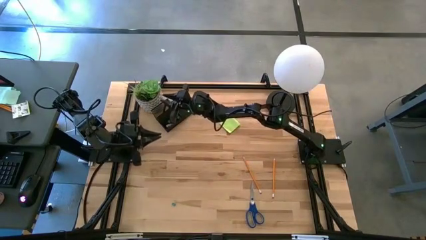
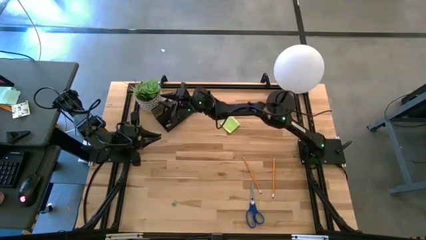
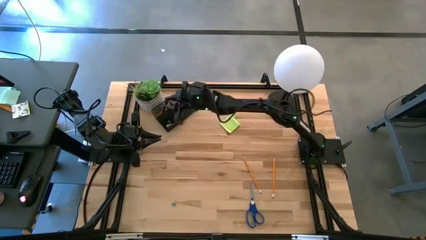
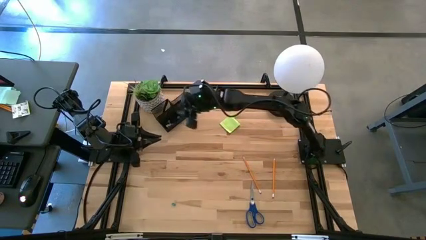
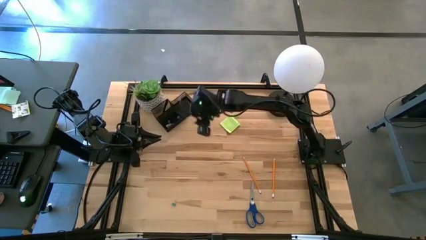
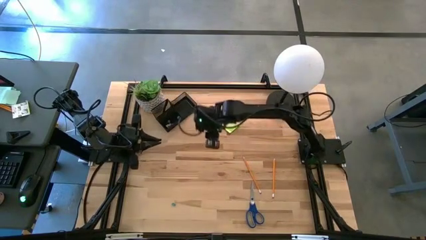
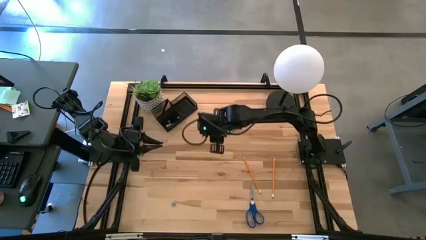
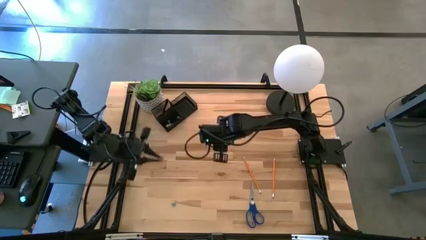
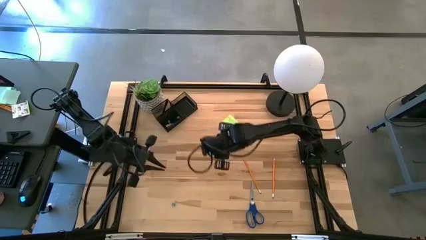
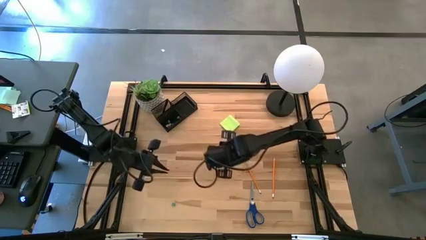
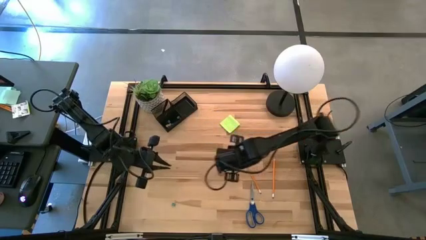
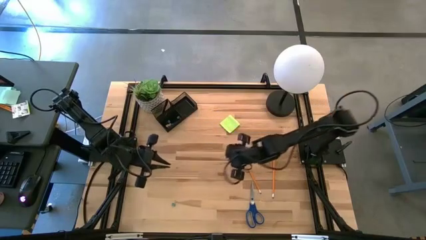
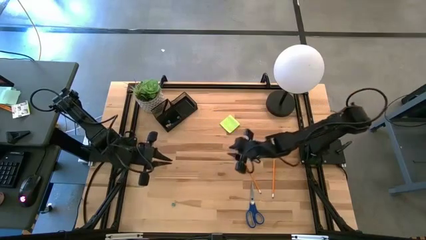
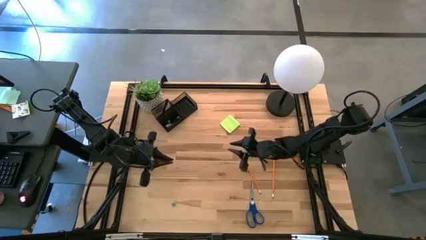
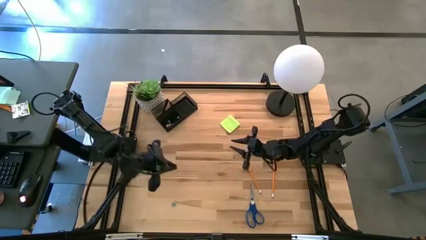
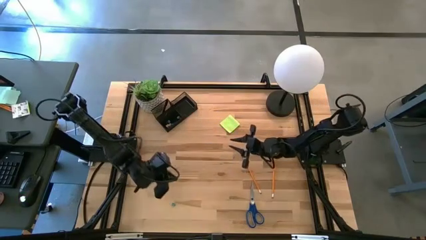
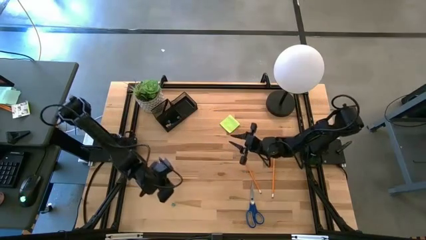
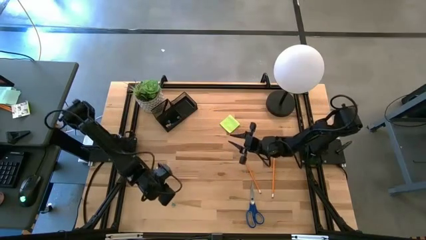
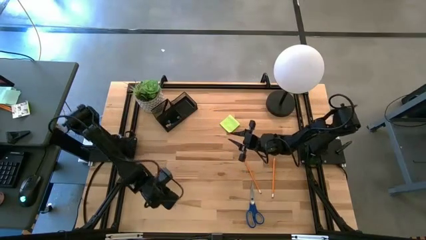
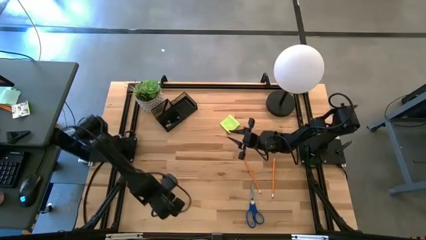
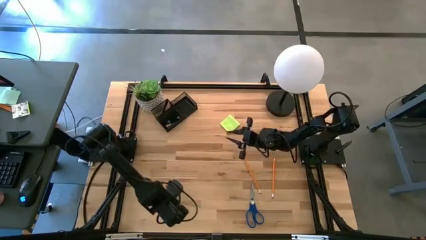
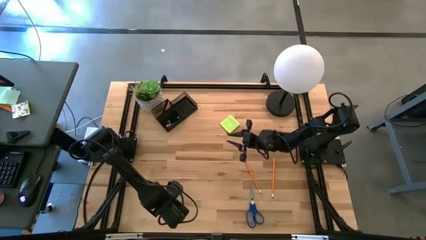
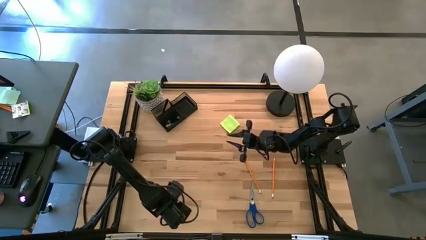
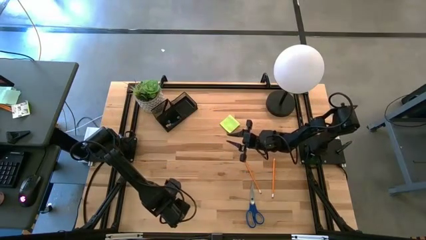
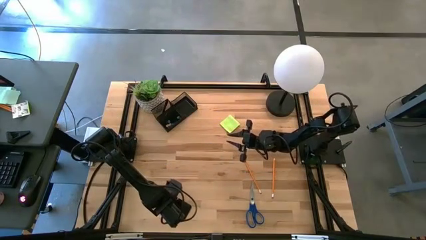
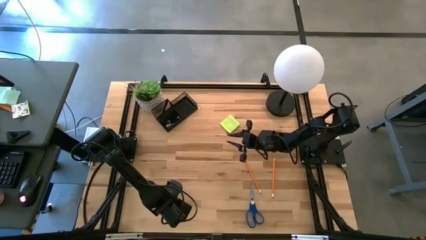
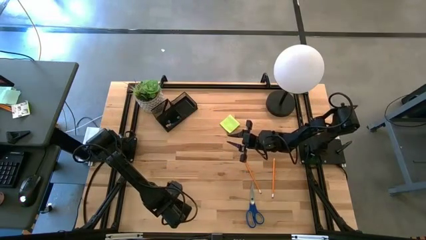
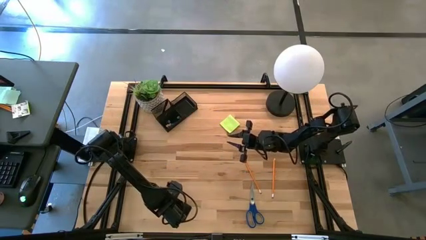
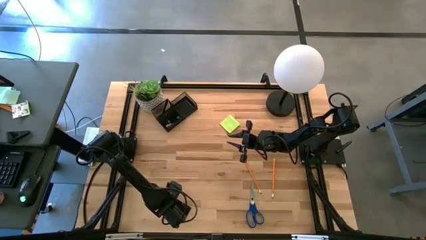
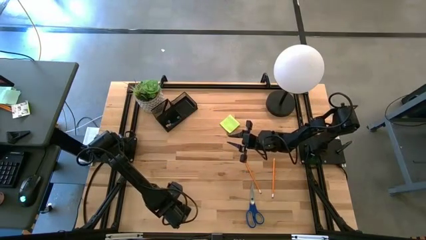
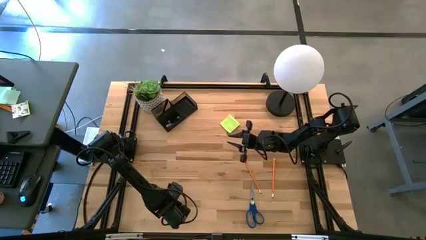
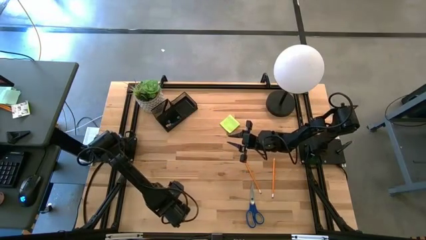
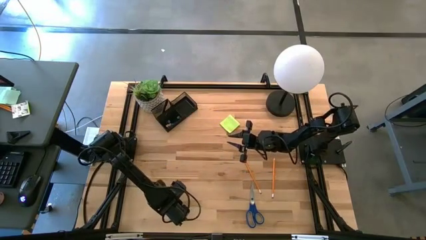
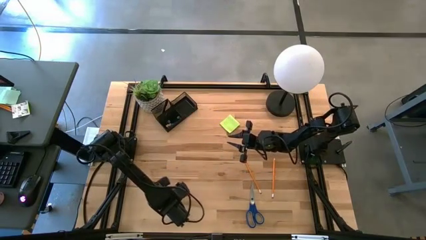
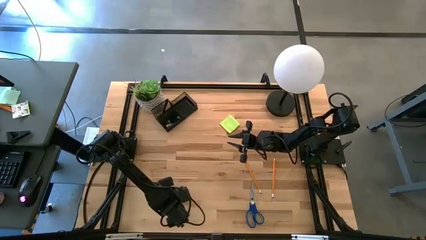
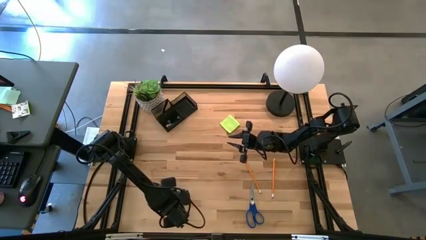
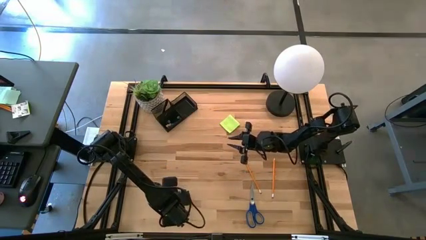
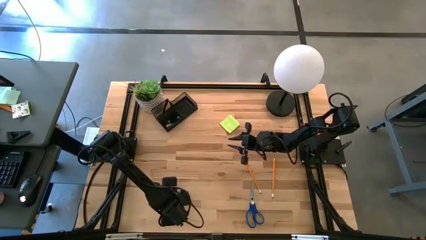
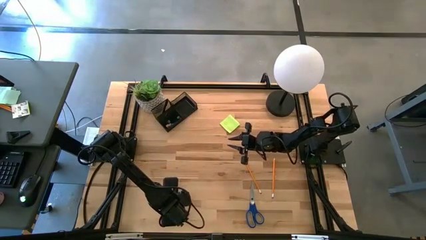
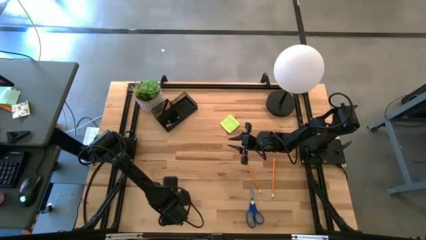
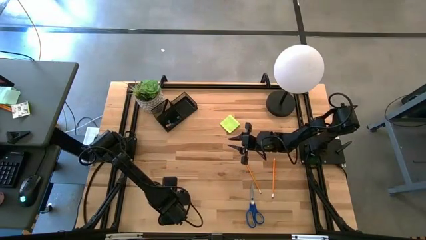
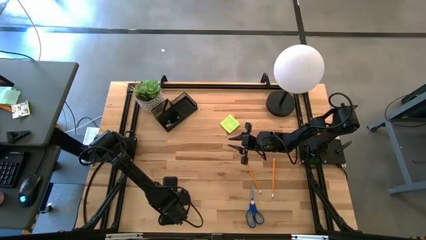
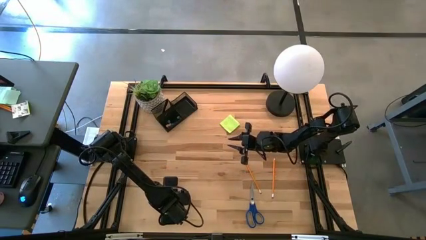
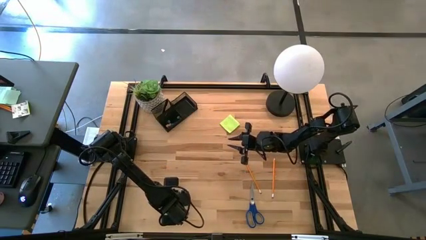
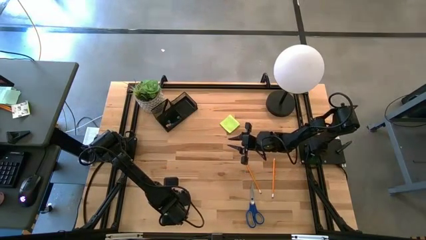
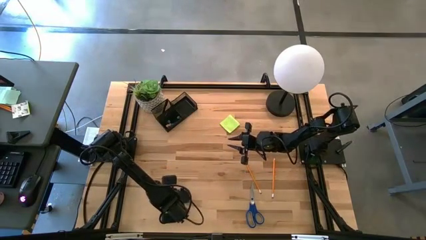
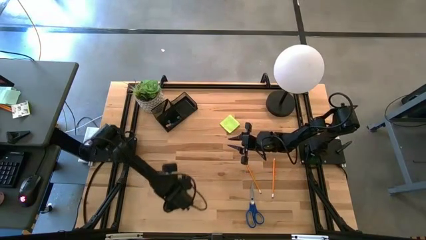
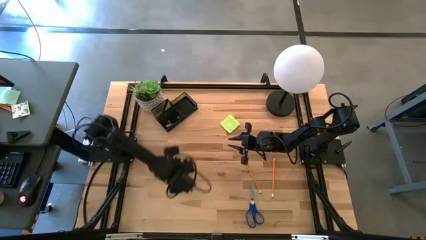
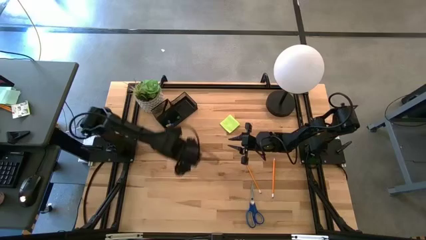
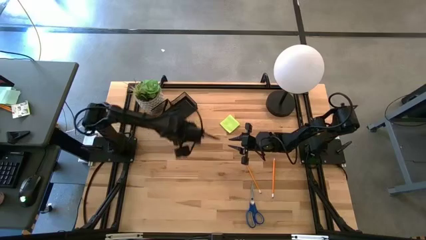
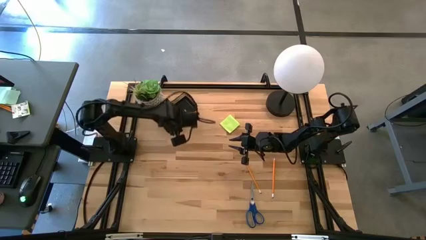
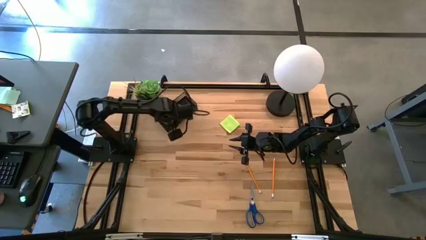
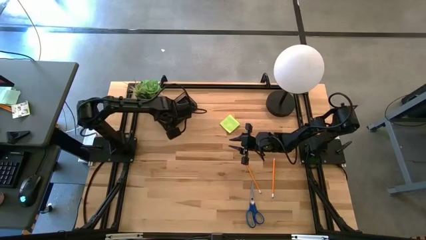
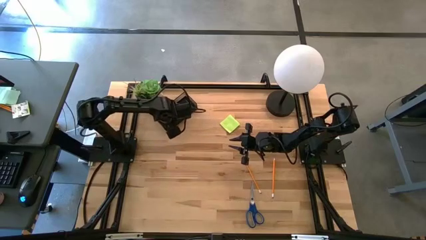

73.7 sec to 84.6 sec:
Task: Pick and place office supplies into organizer
Put the blue binder clip into the desk organizer

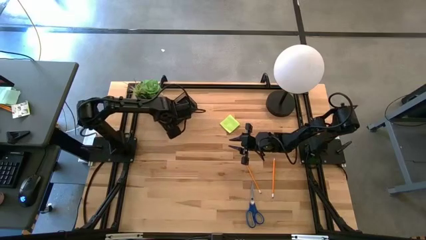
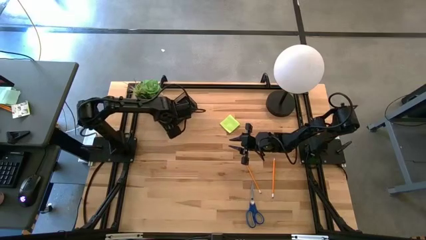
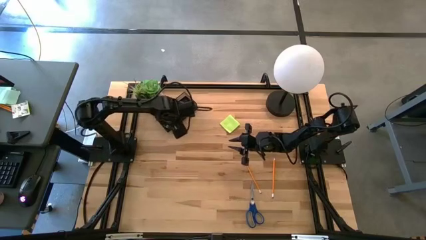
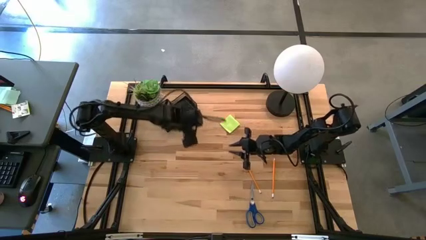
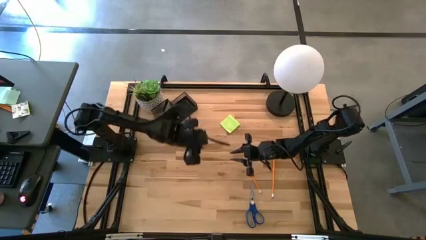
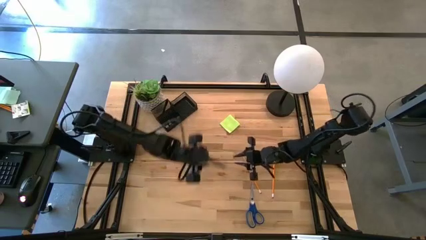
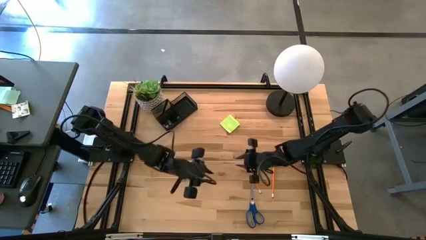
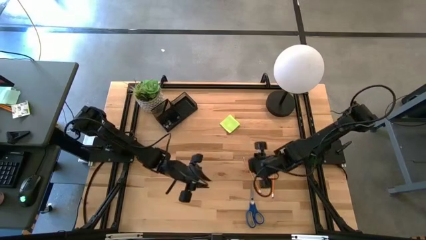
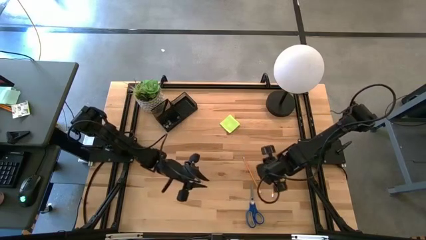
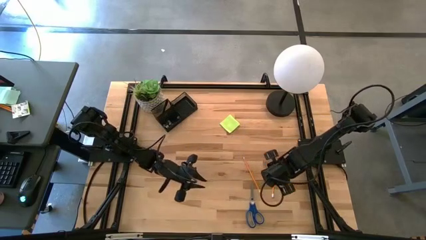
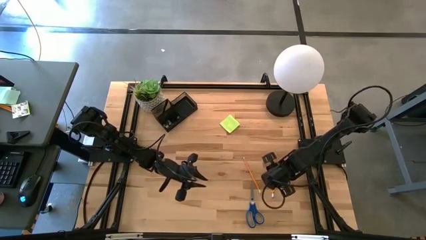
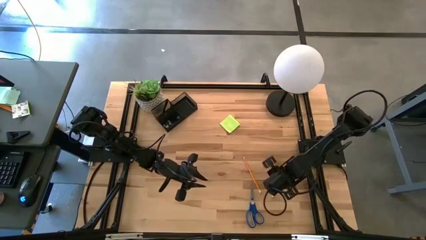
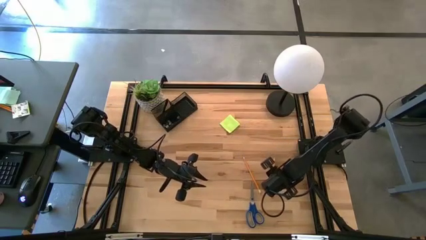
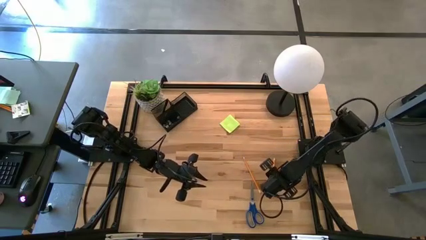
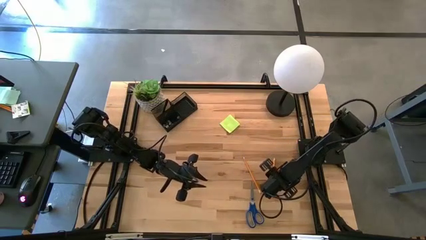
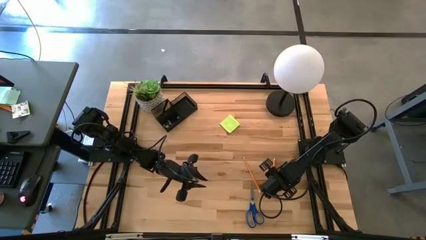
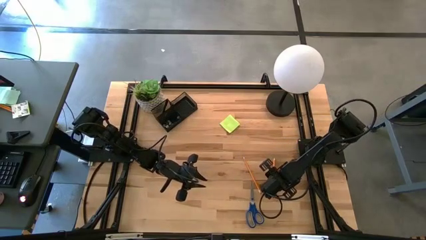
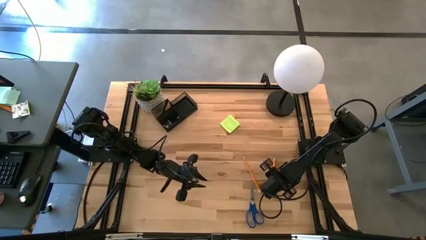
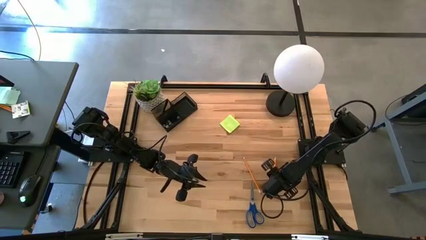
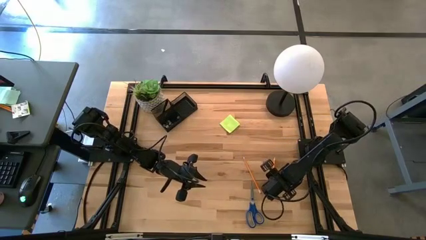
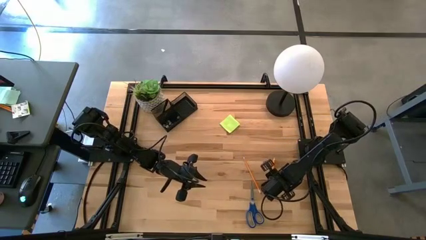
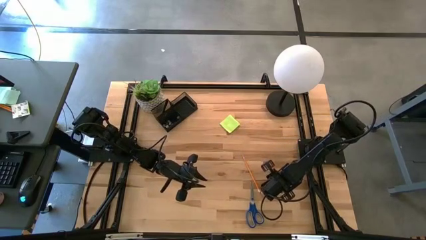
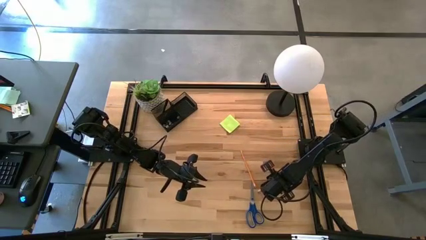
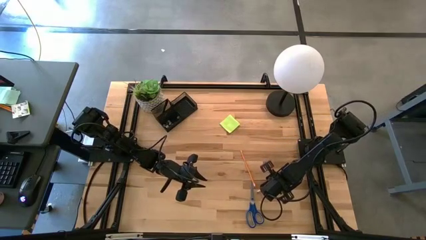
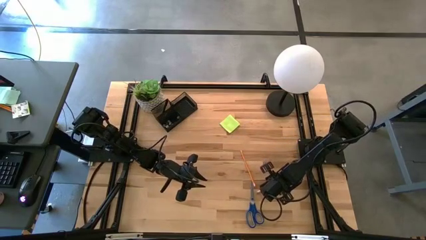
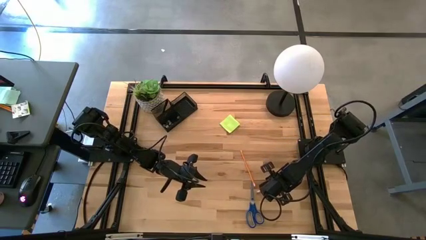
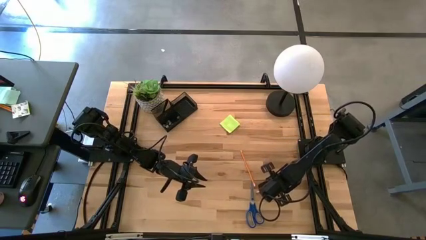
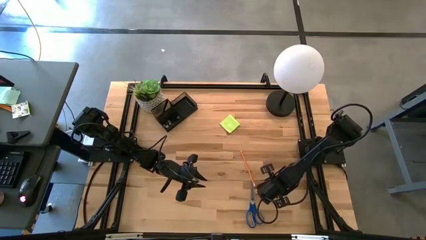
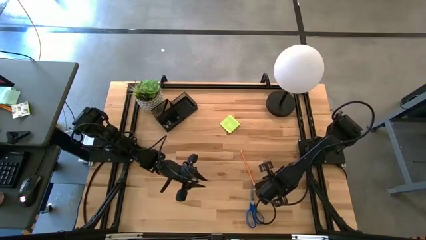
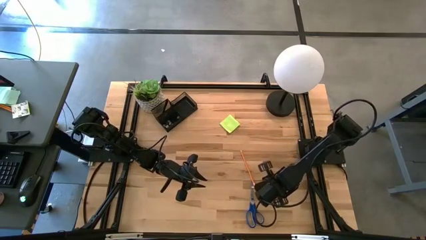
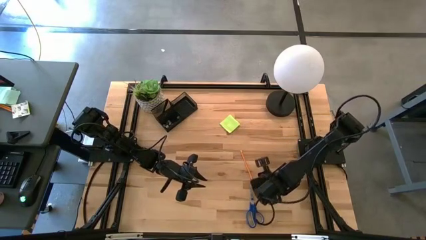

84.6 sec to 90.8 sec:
Put the right yellow pencil into the desk organizer
